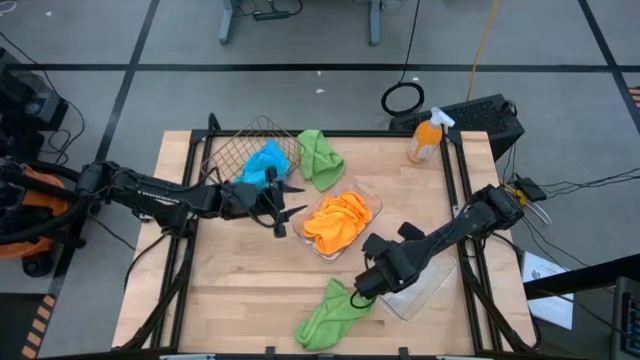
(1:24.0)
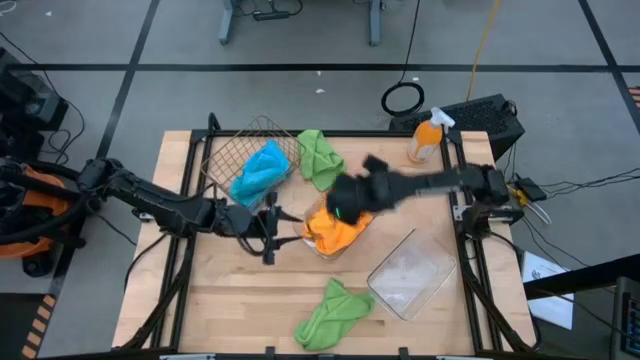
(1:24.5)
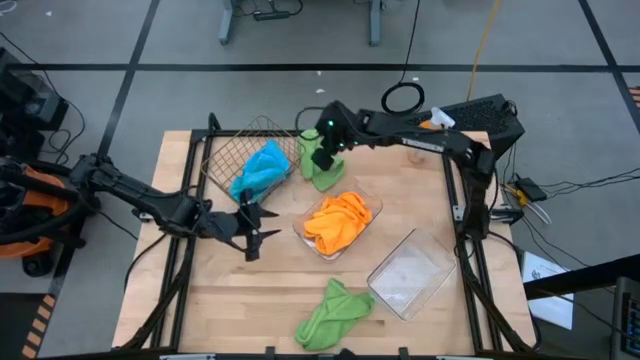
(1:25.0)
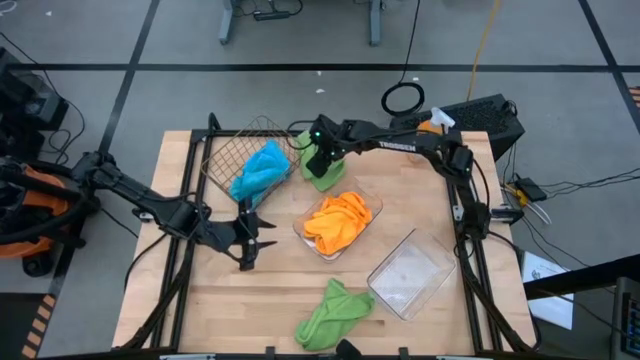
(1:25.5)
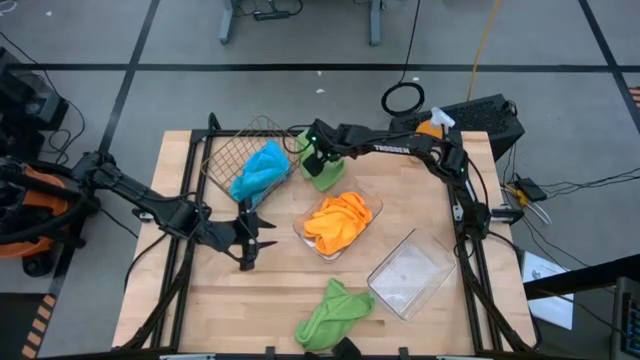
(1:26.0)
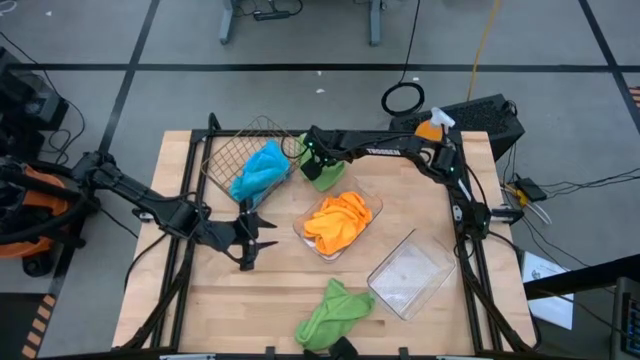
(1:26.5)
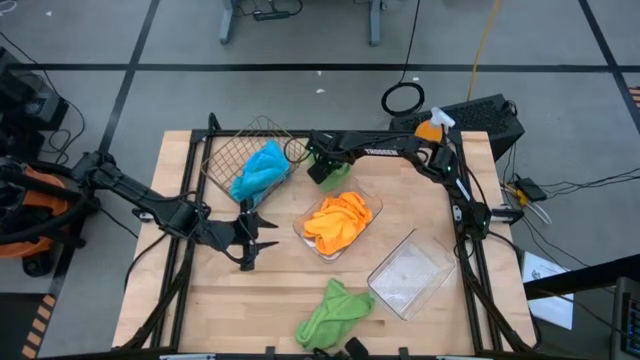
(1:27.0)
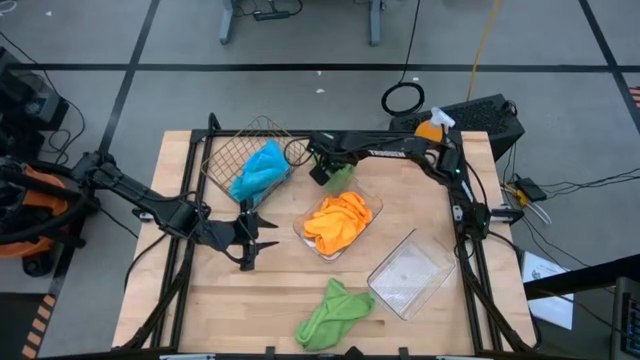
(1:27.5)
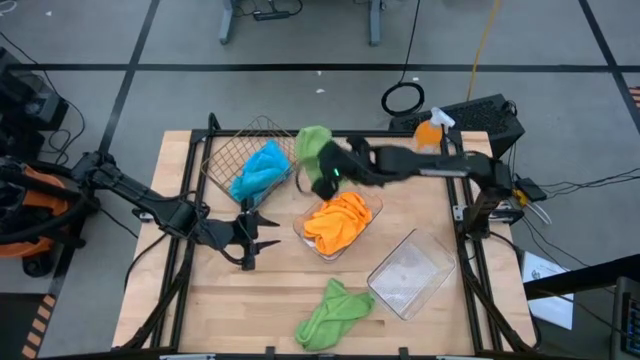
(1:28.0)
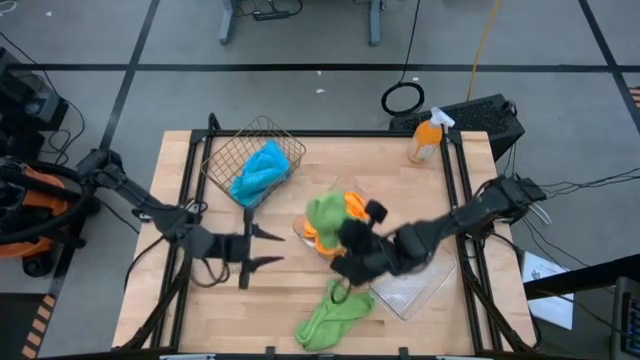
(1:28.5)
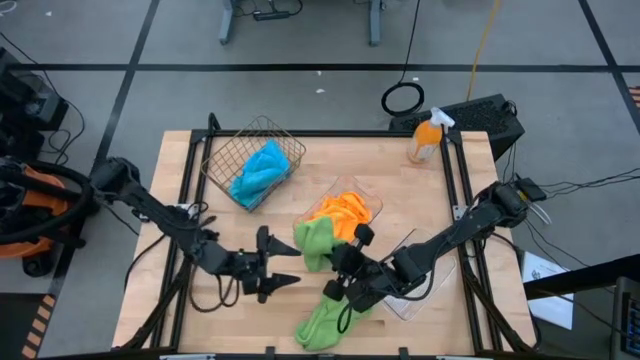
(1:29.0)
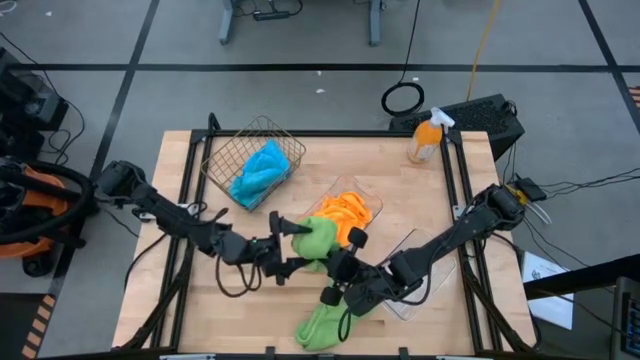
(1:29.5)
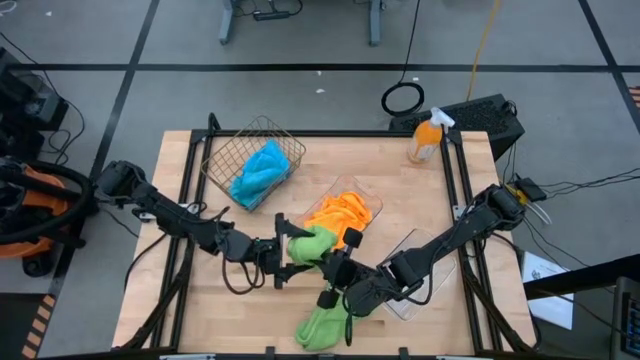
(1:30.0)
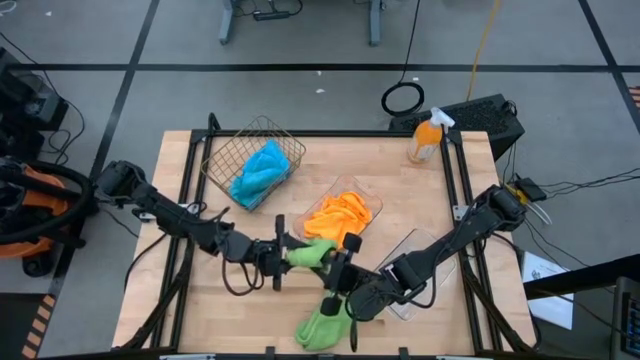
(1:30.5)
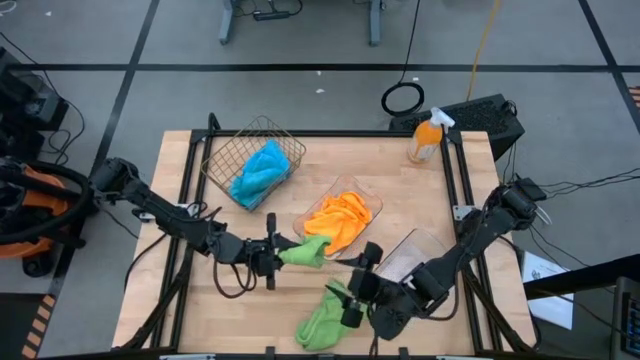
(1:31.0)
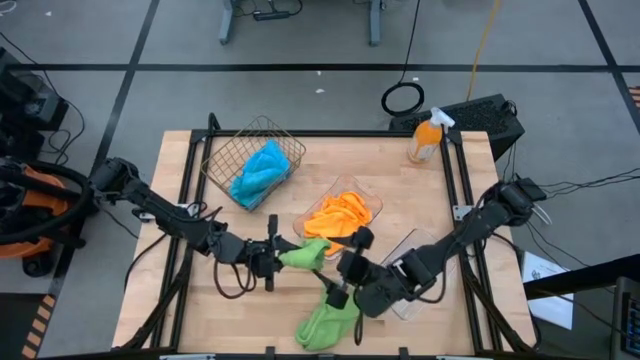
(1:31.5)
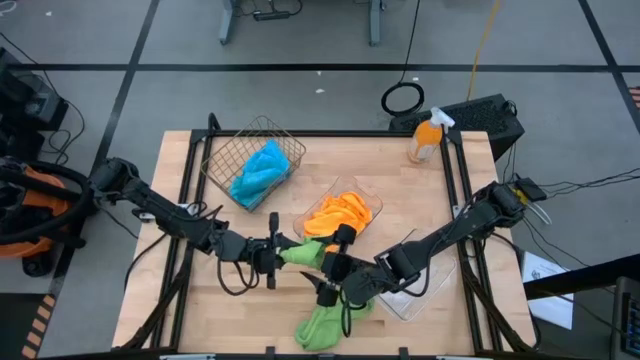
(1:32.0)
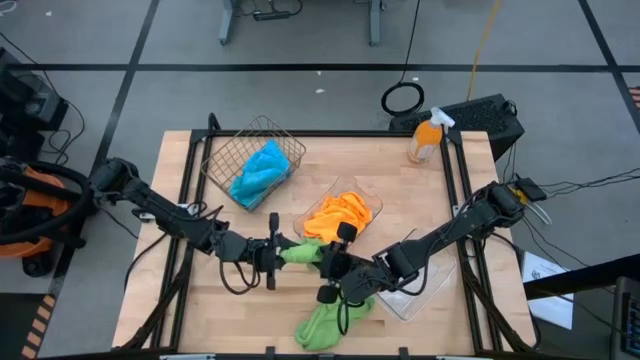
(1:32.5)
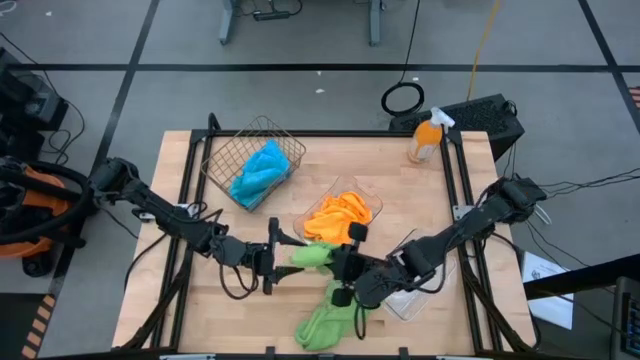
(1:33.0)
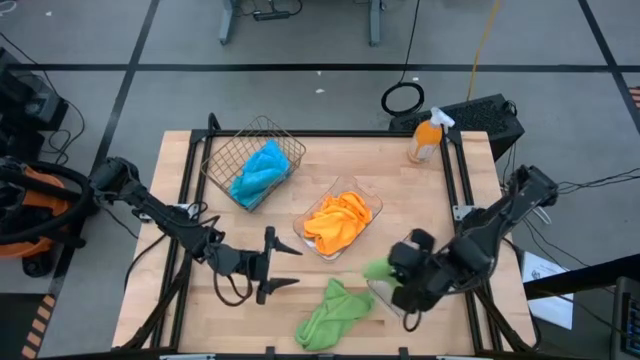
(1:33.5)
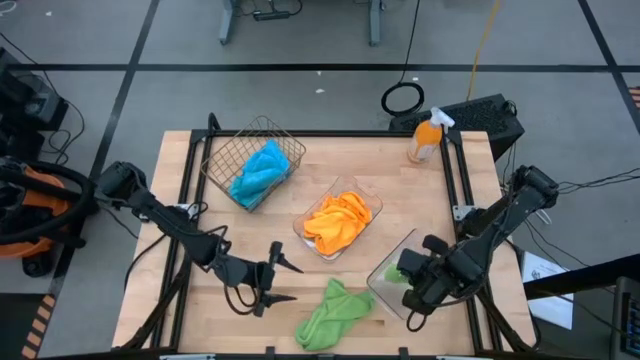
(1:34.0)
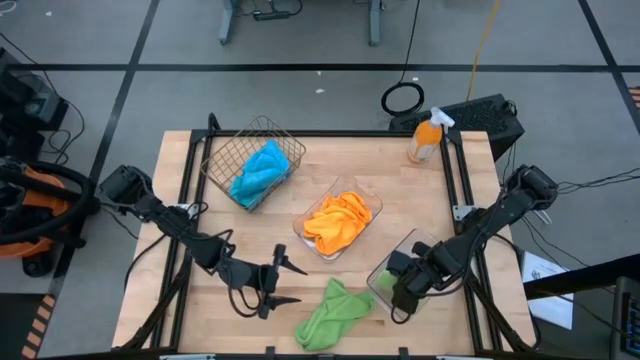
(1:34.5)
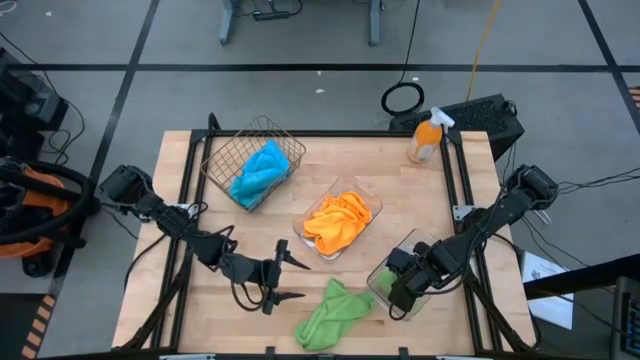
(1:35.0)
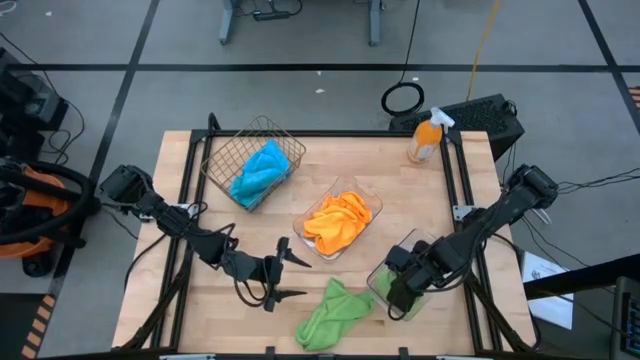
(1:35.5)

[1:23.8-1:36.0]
Task: Sort microfiber towel by color & place in baskets
Put the top green towel into the bottom transparent bin

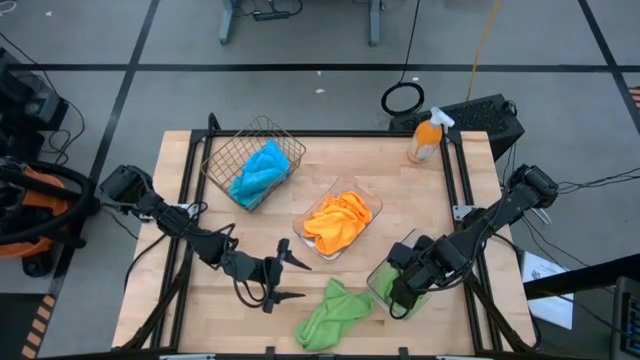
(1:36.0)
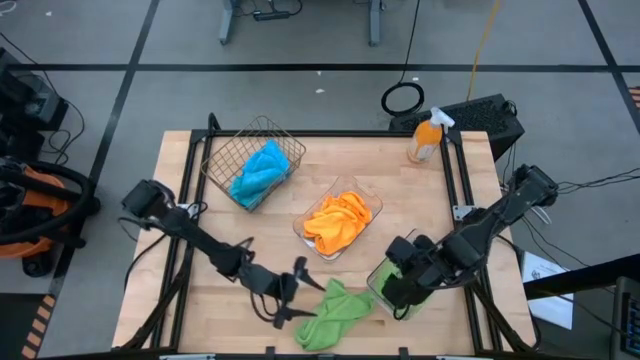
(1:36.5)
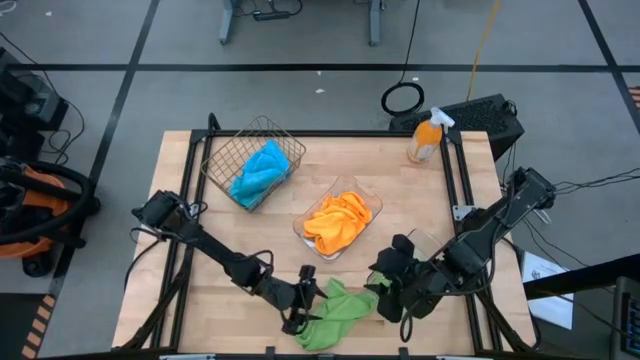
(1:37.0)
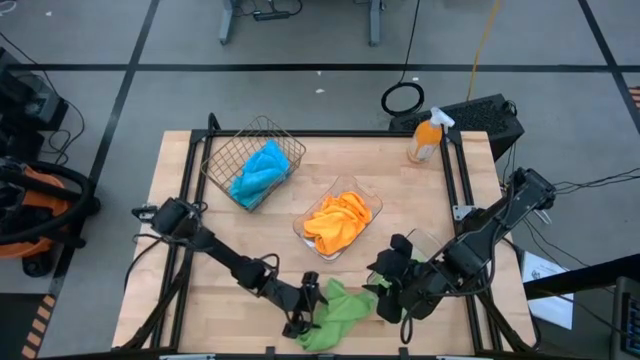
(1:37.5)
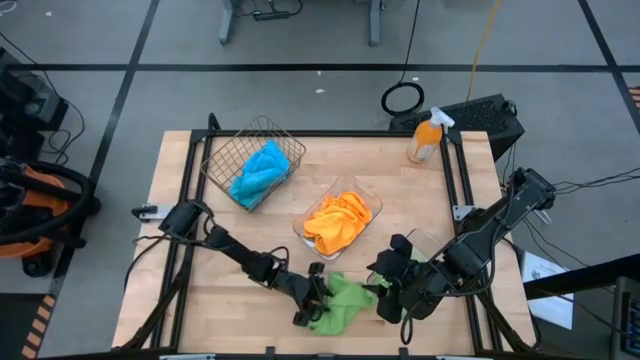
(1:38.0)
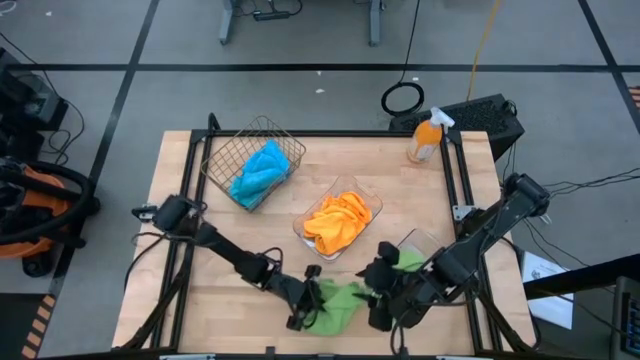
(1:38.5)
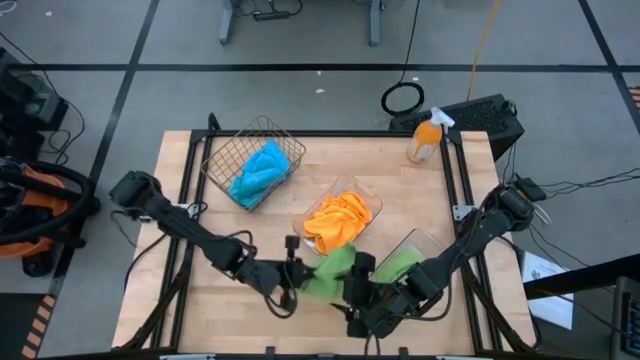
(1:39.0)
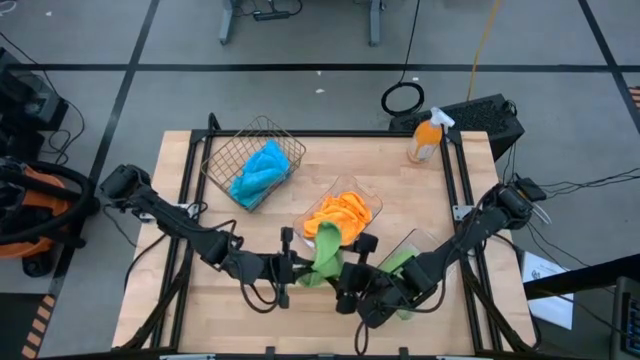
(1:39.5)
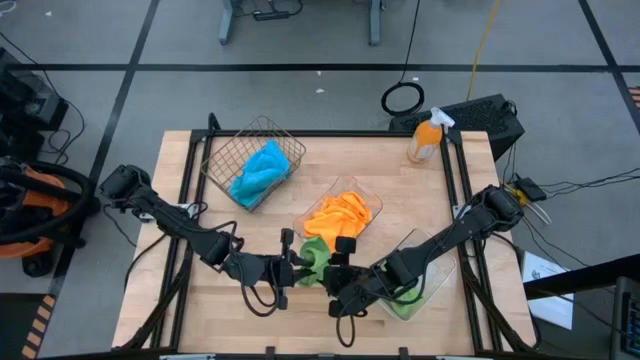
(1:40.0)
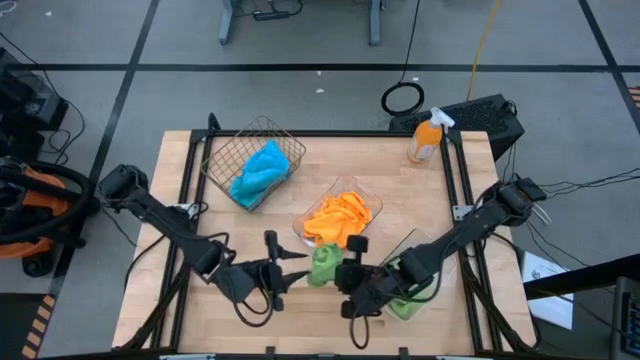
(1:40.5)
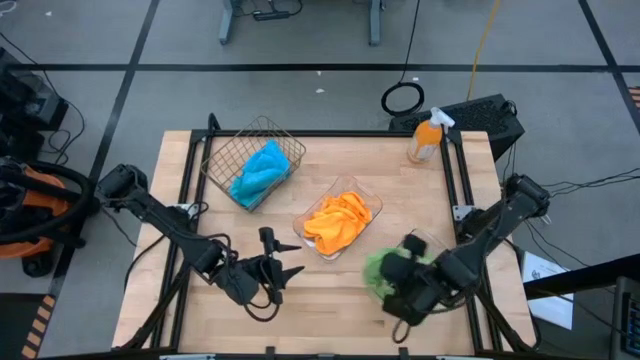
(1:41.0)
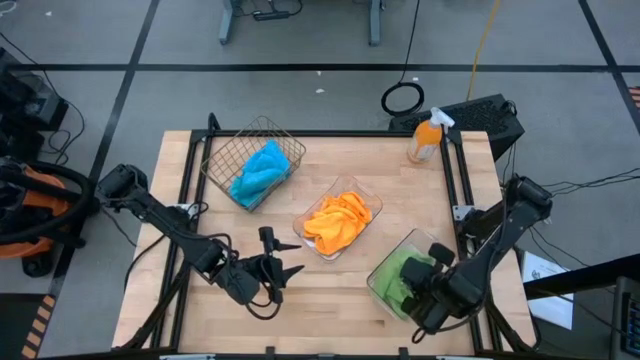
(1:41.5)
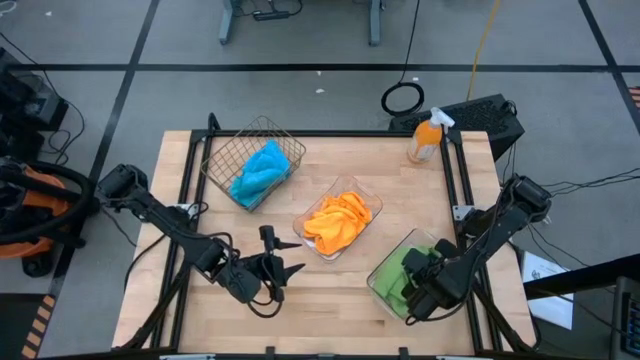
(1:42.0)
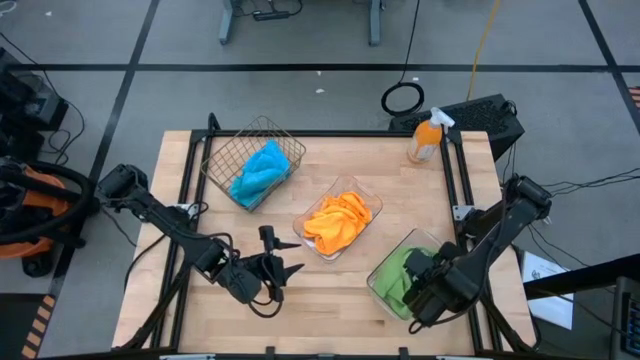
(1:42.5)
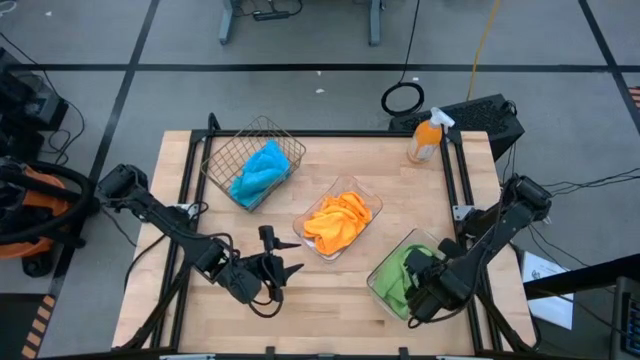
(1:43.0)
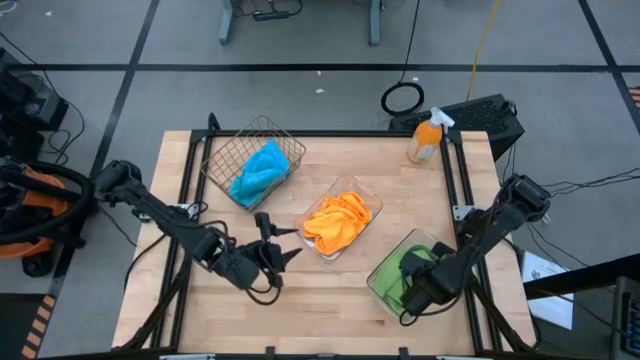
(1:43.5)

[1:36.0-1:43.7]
Put the green towel into the bottom transparent bin
